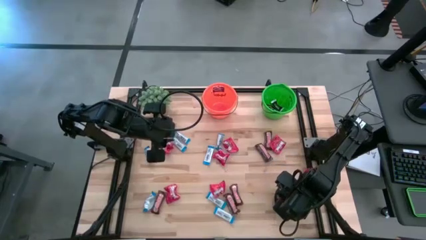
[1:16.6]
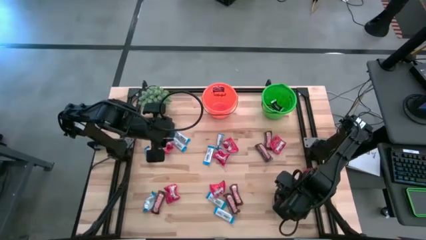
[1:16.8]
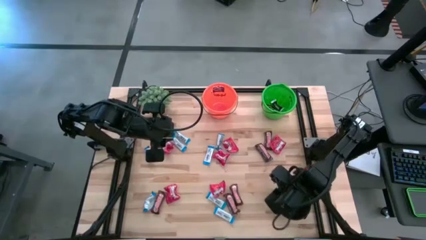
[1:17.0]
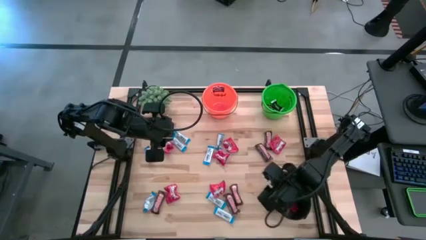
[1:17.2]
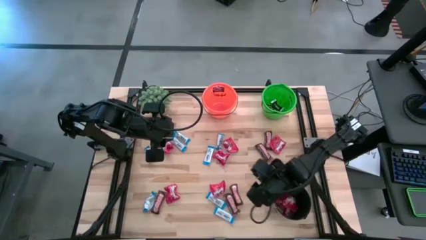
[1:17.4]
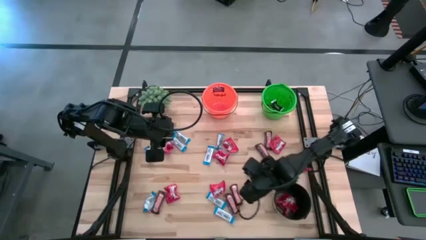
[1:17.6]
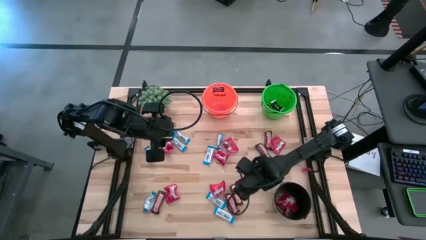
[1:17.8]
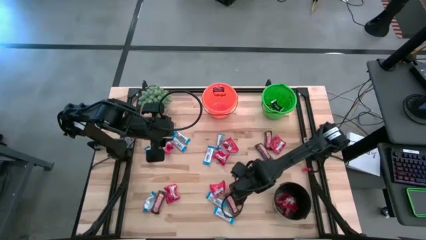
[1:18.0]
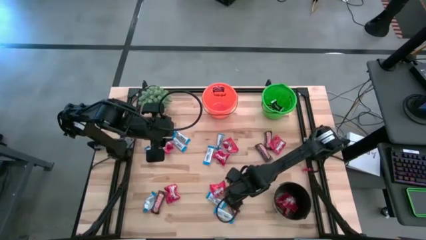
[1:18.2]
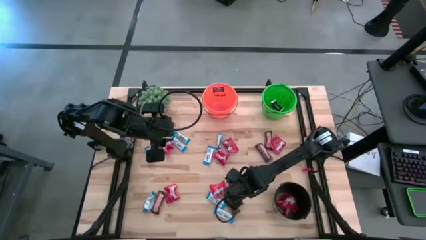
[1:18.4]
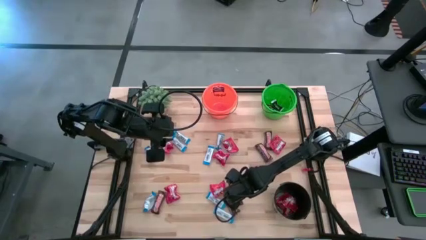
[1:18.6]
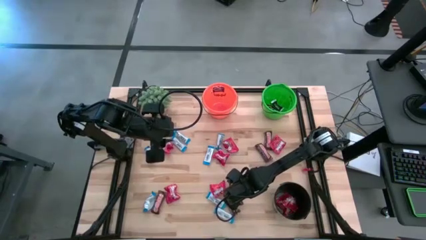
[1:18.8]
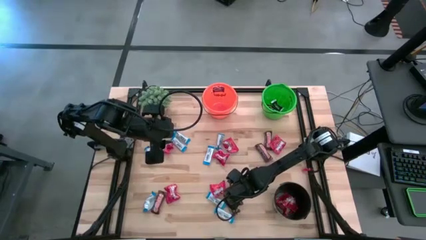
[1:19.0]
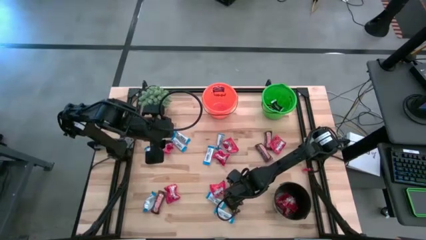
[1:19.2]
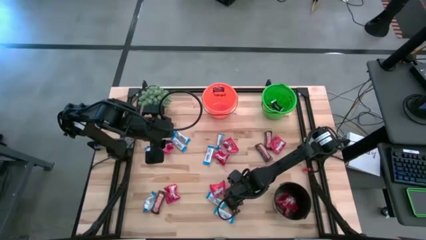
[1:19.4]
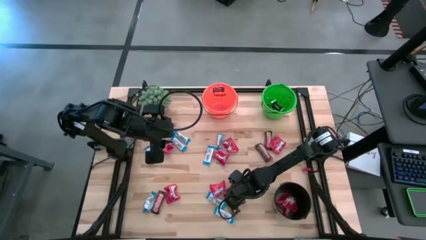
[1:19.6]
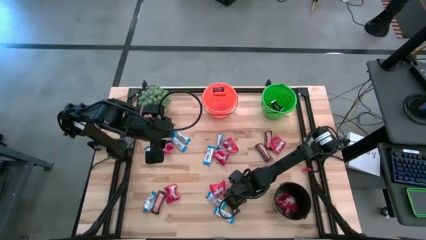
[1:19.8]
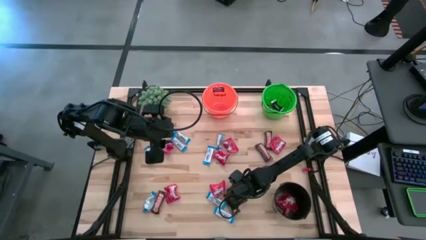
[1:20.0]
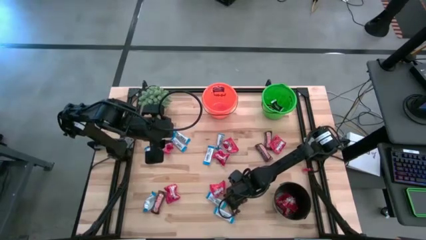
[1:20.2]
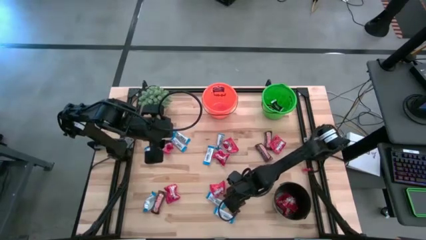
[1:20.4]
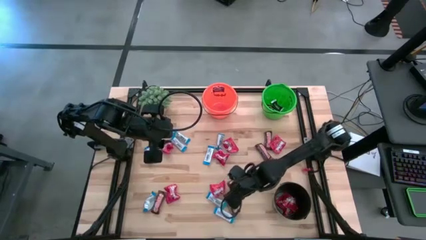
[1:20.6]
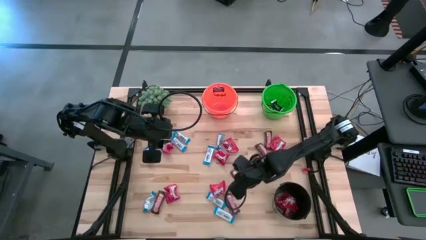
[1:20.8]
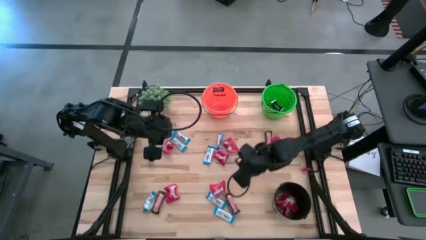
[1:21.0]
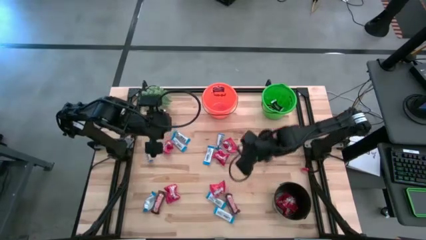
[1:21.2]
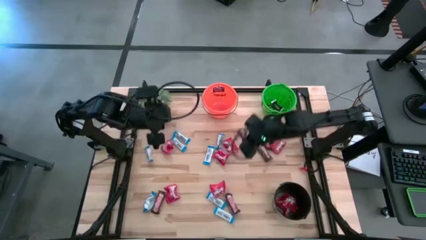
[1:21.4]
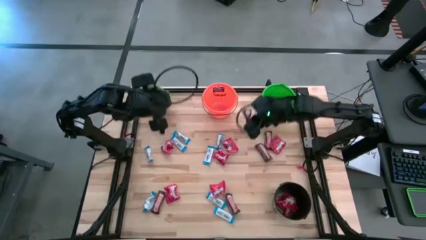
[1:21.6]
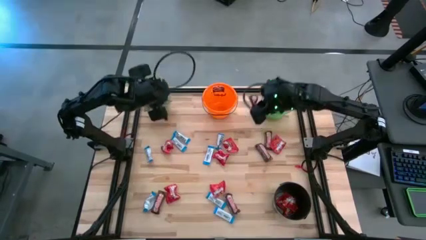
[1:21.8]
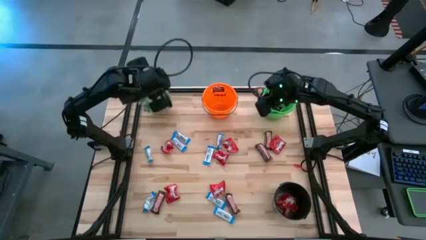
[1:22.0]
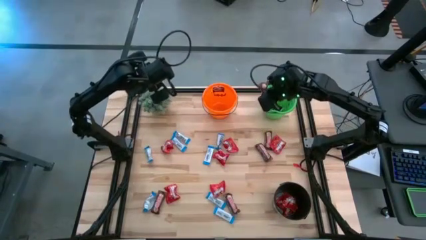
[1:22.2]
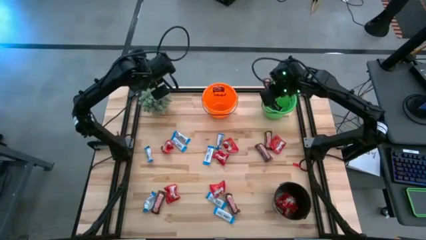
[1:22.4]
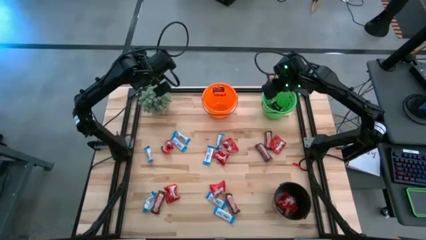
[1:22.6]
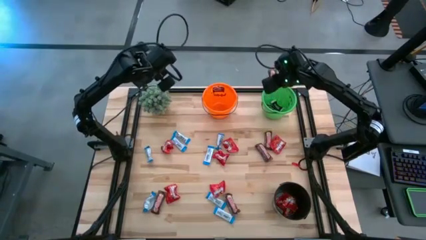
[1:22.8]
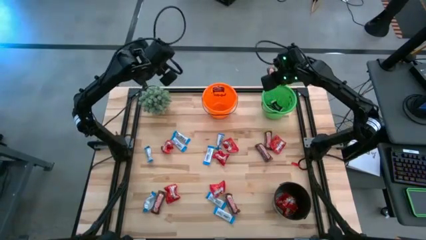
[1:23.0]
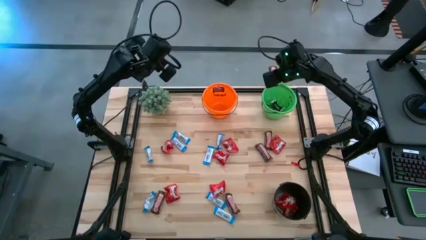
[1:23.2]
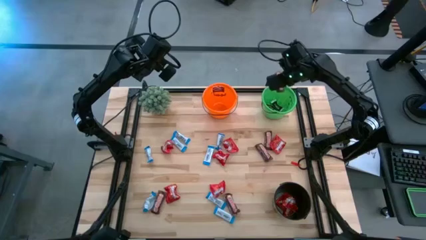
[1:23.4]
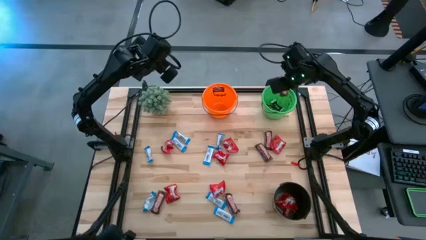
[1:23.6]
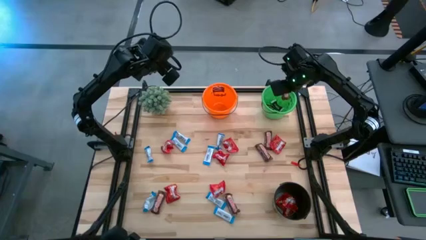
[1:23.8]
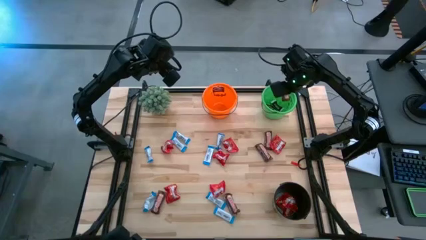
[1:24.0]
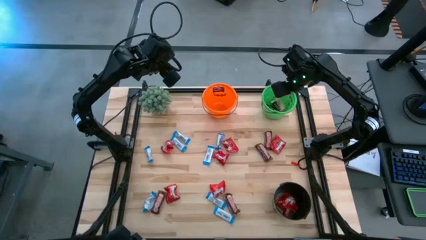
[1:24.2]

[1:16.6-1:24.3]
Task: Organize candy in baskets
Put the brown chocolate into the green bucket

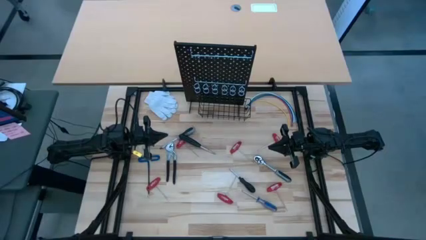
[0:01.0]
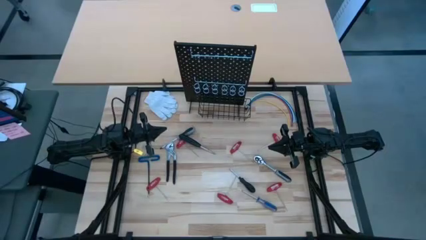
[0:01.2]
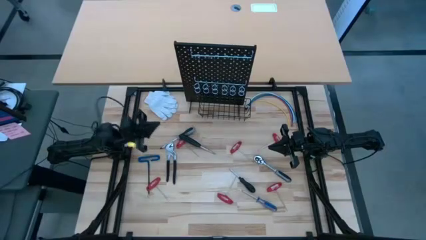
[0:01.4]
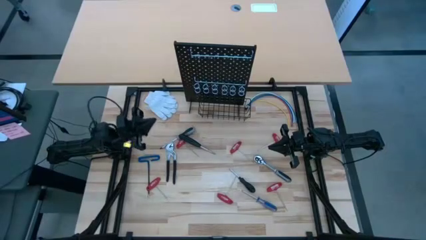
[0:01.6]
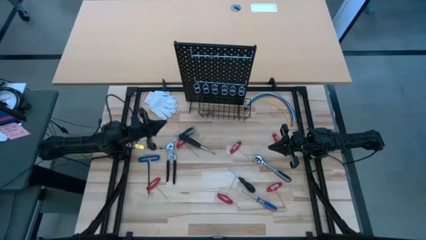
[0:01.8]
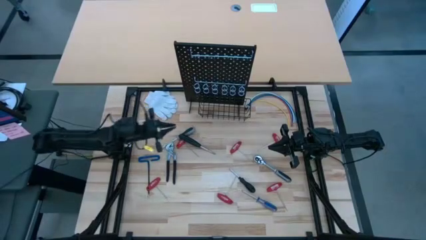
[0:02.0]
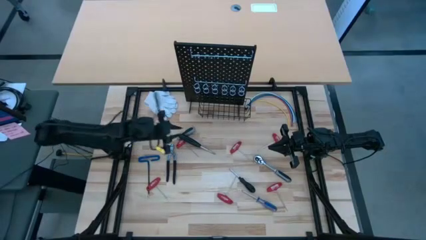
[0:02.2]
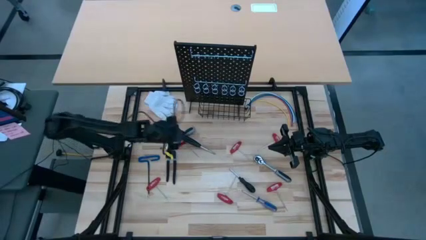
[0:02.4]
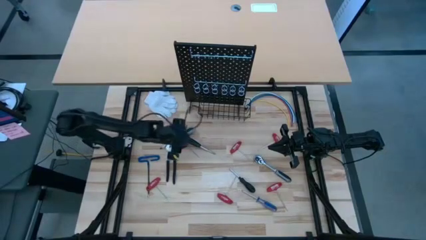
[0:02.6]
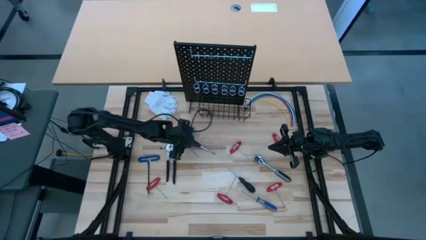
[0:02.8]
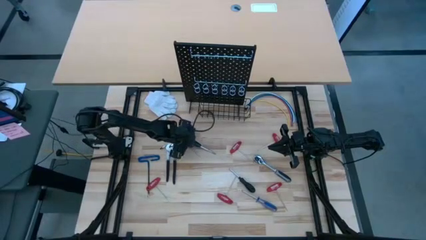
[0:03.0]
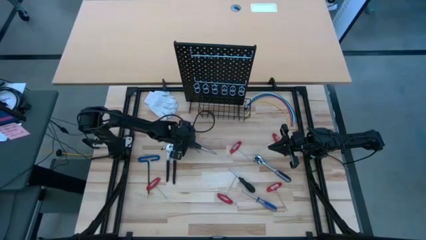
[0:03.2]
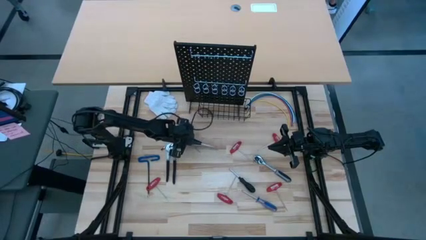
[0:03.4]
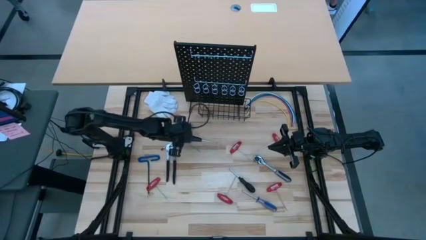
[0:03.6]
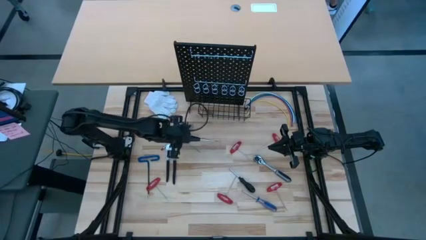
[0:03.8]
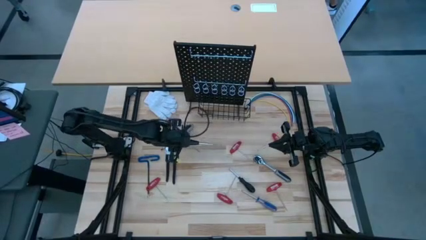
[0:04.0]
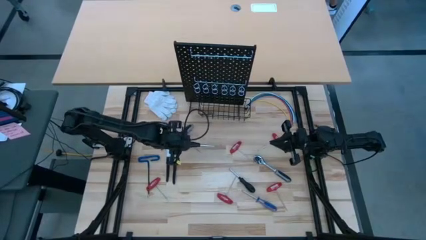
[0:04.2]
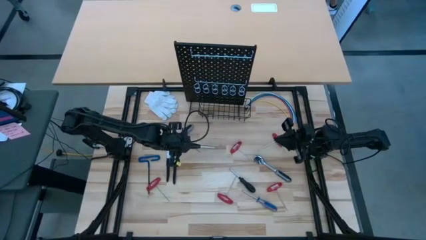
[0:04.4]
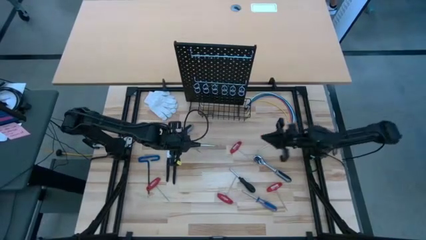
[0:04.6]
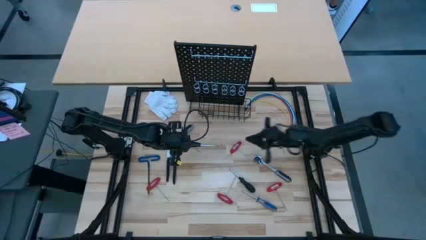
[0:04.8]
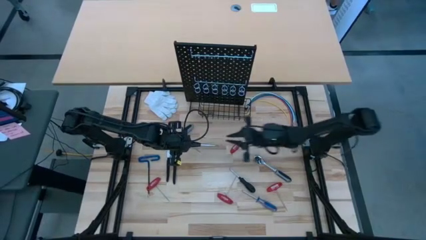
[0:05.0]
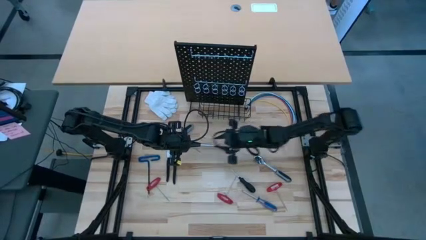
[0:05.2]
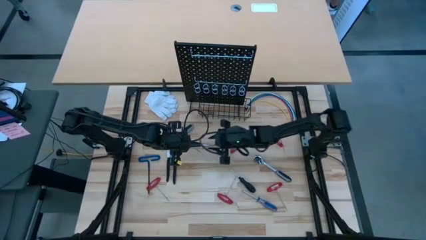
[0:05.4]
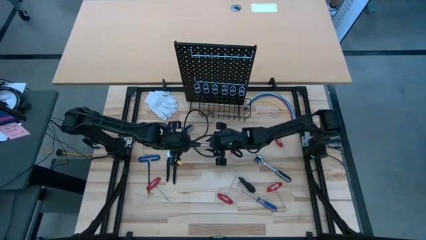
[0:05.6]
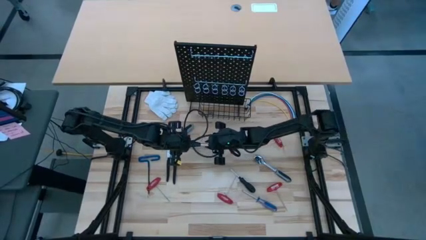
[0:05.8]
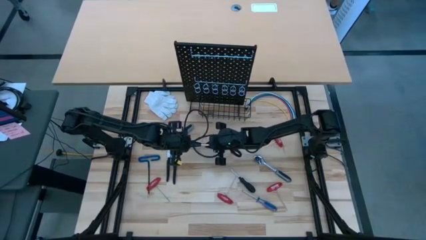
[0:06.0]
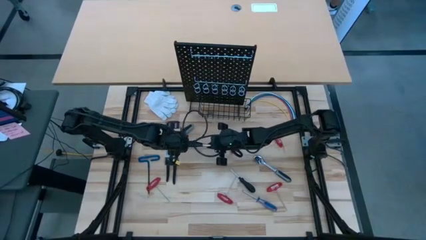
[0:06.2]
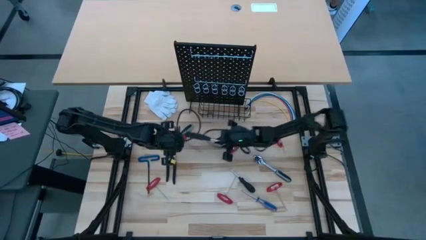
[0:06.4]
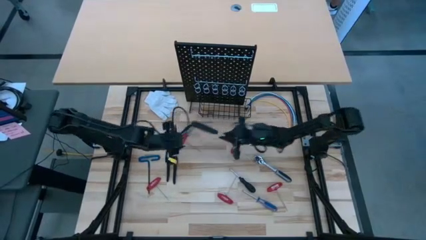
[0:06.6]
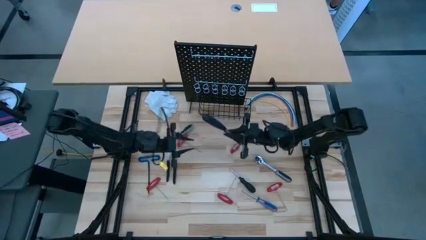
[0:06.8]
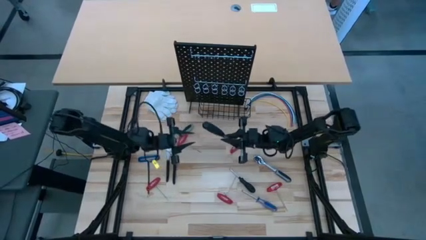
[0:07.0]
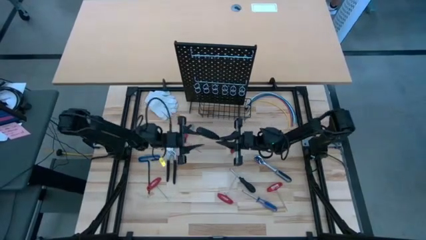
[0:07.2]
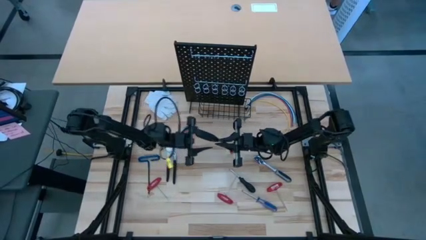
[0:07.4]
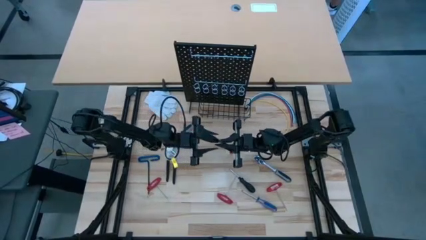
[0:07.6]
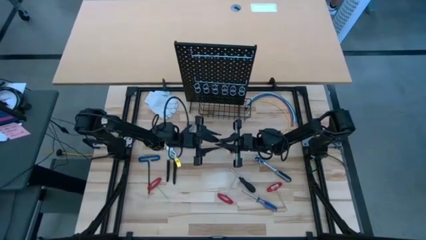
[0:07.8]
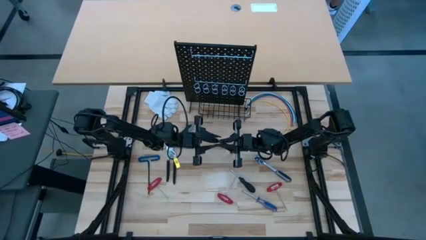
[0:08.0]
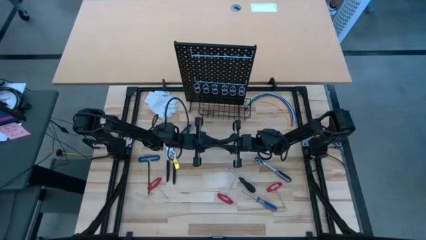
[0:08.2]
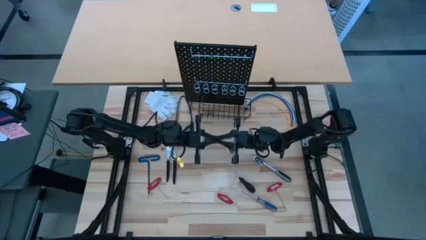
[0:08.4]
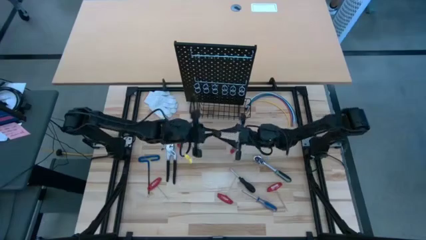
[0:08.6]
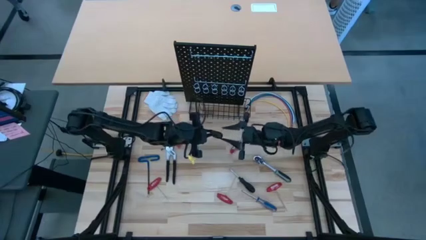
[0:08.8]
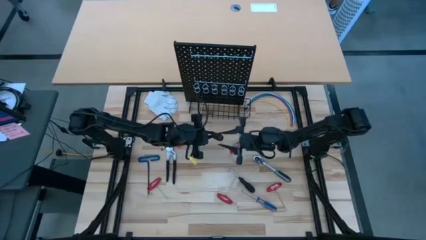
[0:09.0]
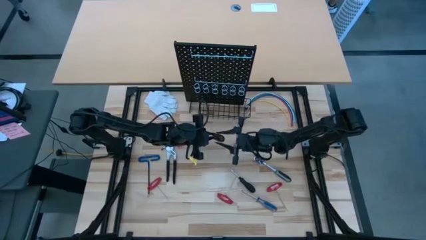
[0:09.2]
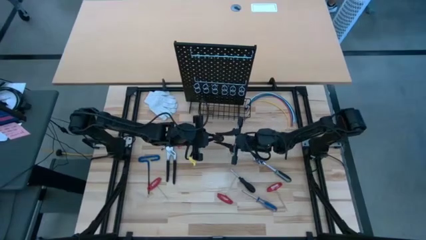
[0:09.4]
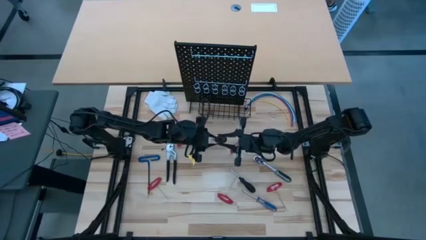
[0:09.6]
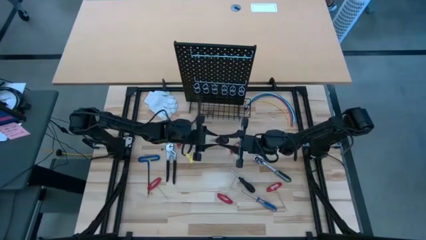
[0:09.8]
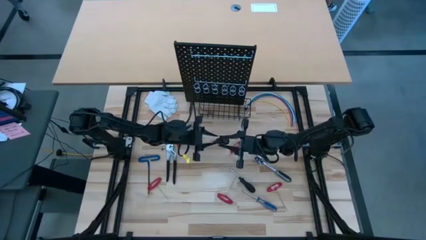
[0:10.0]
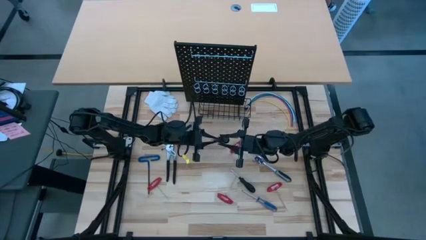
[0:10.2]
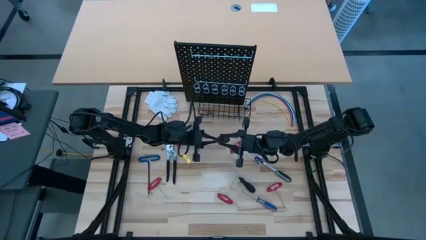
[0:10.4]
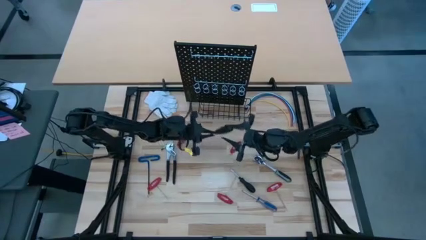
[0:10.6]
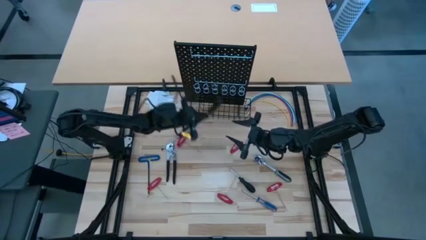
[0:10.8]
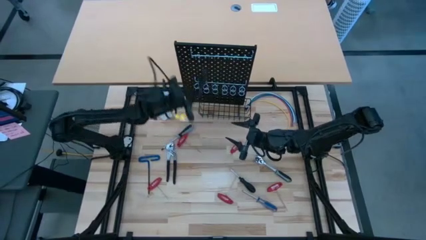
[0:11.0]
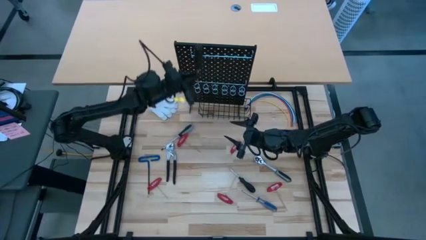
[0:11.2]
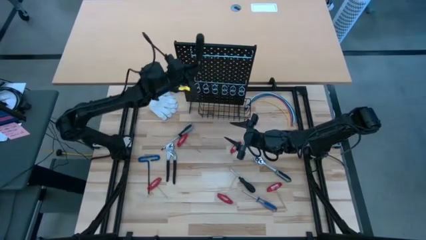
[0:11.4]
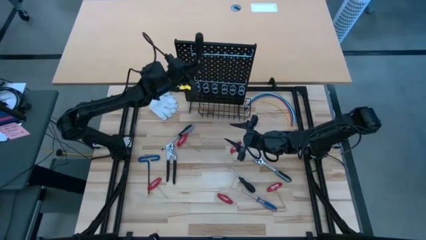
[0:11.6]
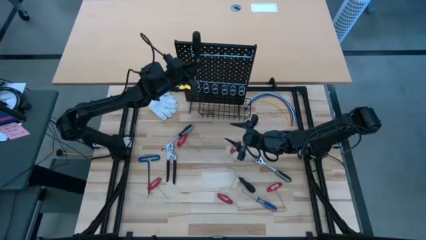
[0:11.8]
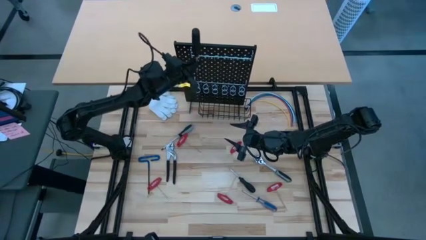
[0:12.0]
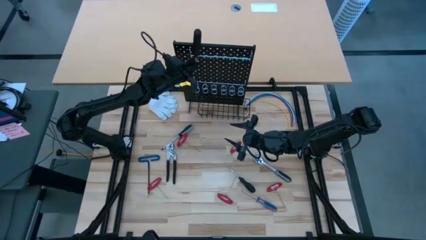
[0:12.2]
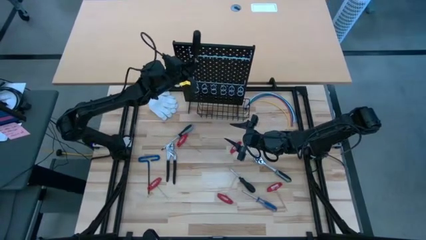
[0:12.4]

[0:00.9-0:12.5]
Task: Hang tools onto peg board
Hang the black screwdriver on the pegboard
